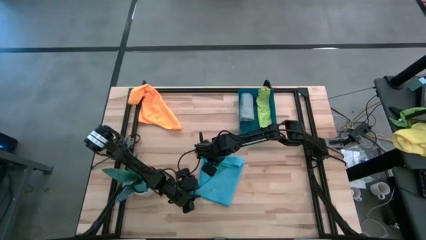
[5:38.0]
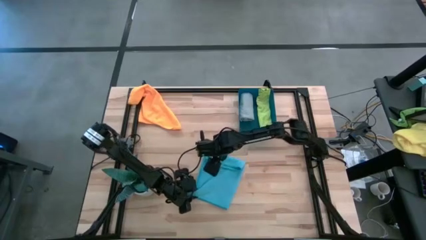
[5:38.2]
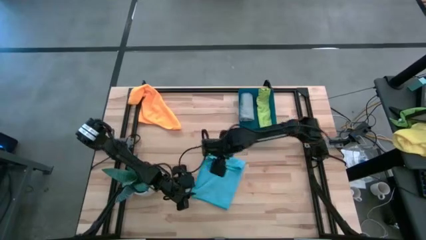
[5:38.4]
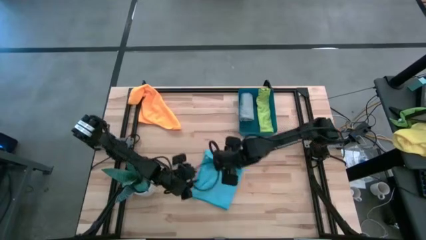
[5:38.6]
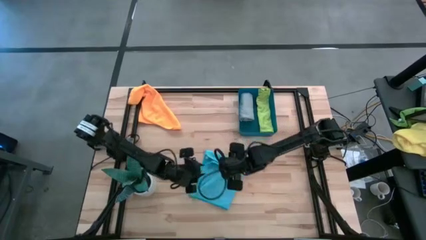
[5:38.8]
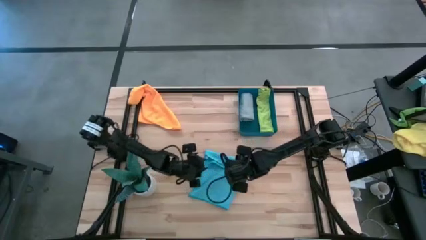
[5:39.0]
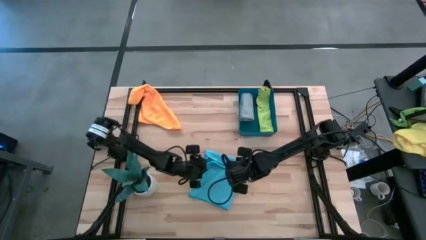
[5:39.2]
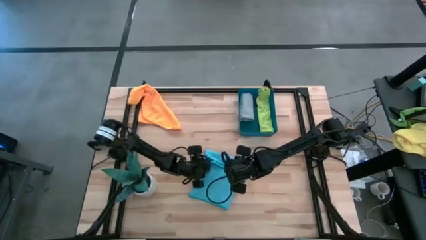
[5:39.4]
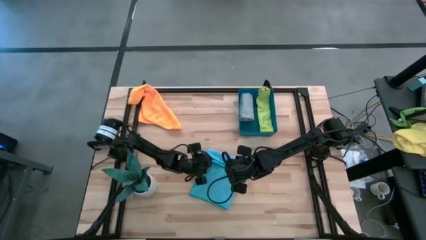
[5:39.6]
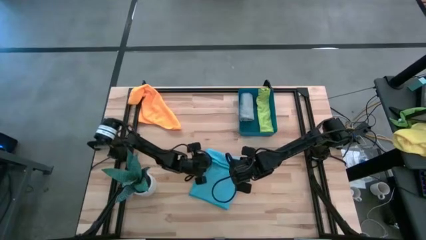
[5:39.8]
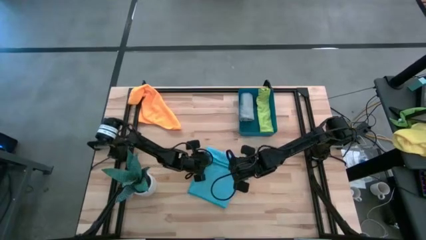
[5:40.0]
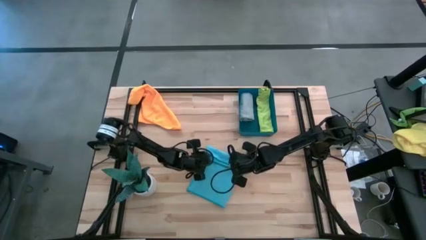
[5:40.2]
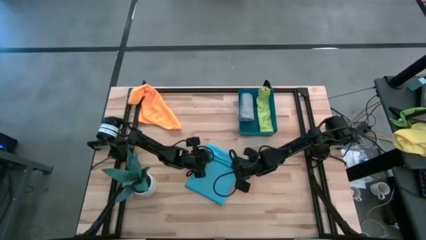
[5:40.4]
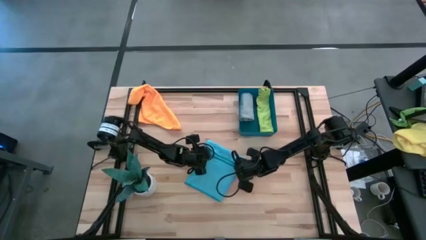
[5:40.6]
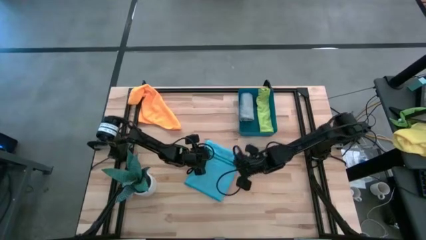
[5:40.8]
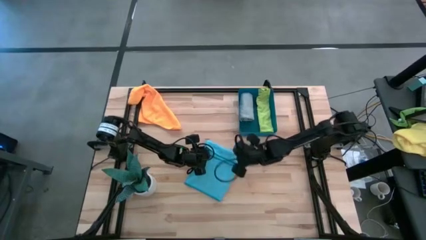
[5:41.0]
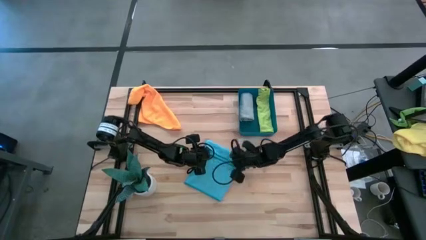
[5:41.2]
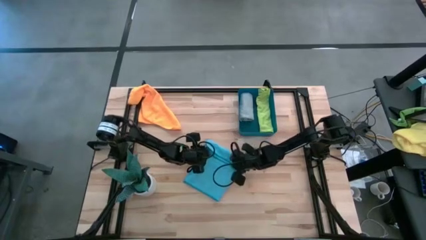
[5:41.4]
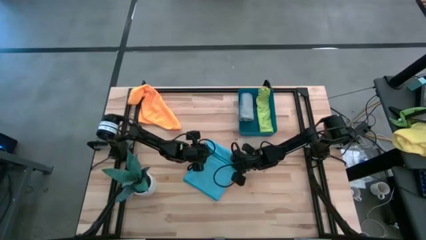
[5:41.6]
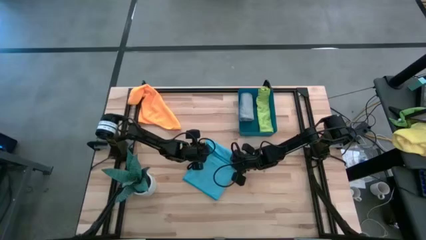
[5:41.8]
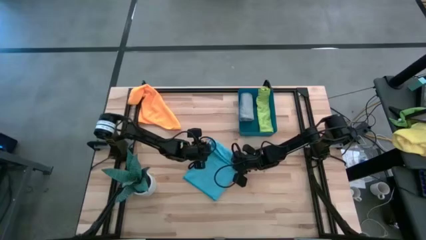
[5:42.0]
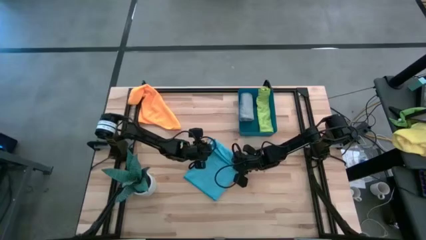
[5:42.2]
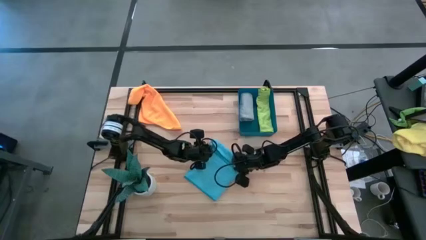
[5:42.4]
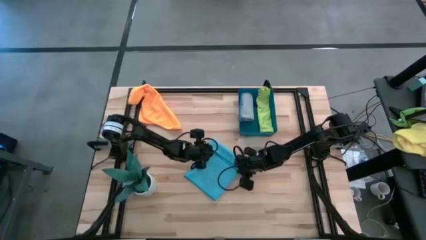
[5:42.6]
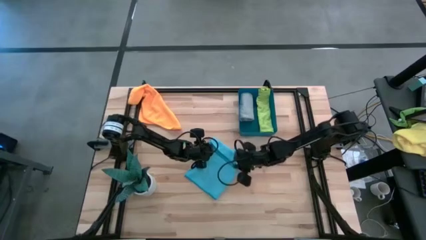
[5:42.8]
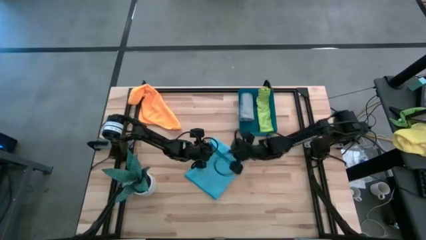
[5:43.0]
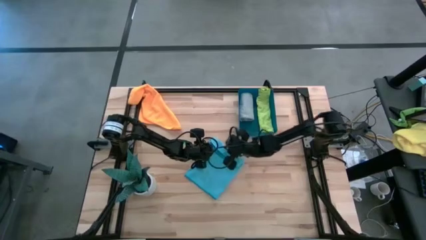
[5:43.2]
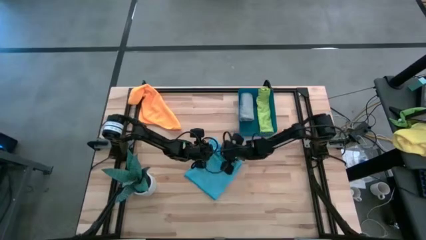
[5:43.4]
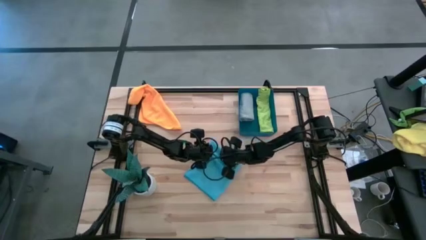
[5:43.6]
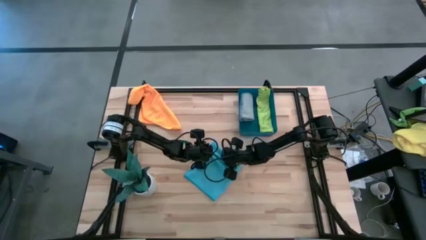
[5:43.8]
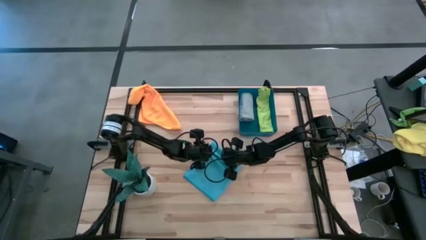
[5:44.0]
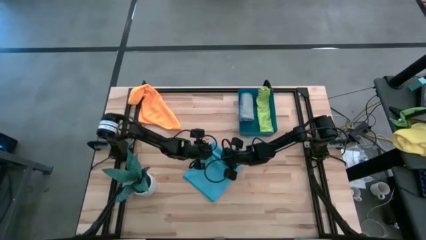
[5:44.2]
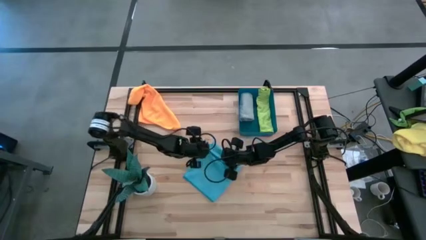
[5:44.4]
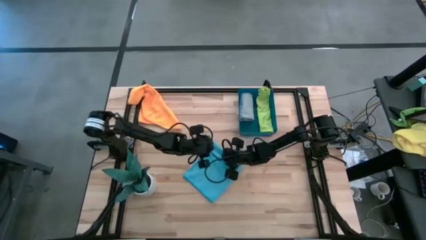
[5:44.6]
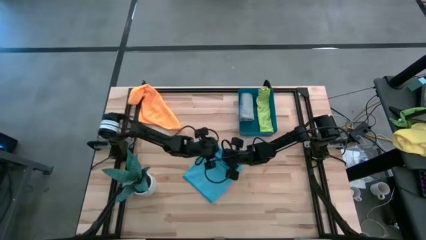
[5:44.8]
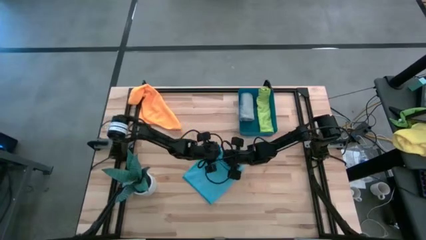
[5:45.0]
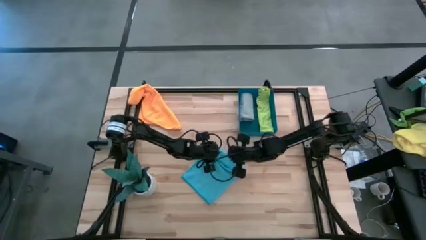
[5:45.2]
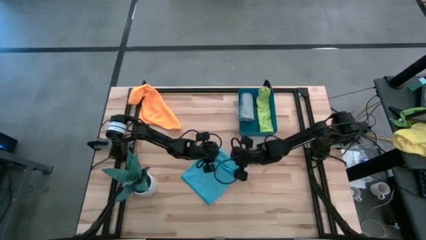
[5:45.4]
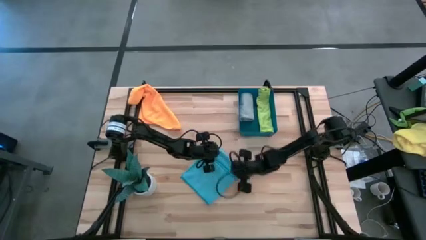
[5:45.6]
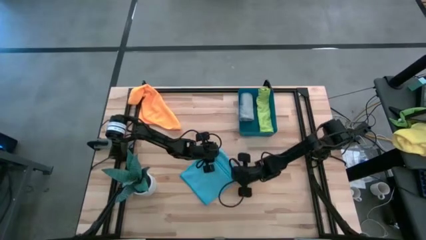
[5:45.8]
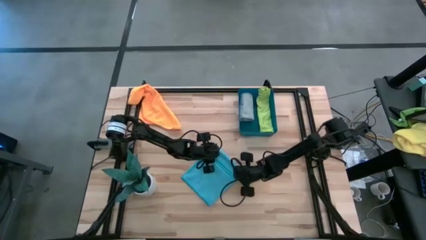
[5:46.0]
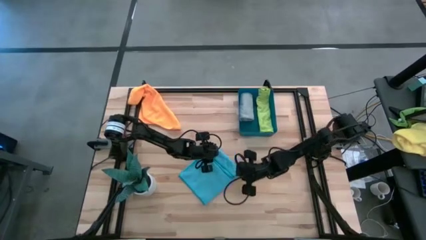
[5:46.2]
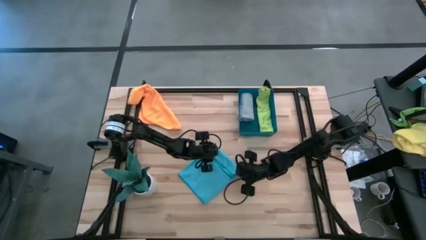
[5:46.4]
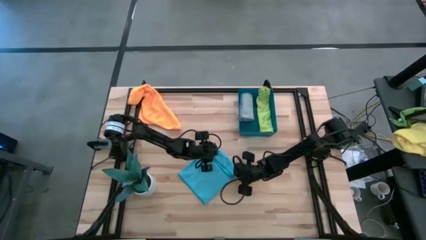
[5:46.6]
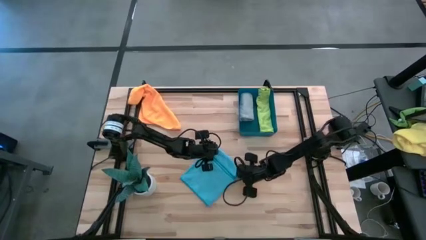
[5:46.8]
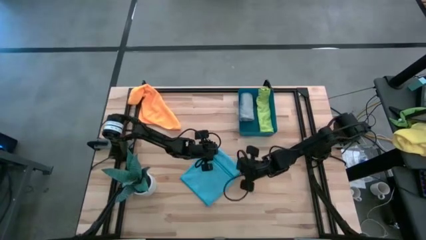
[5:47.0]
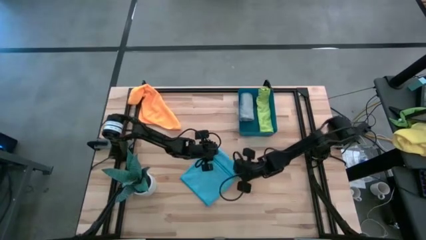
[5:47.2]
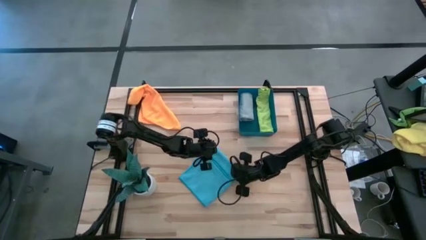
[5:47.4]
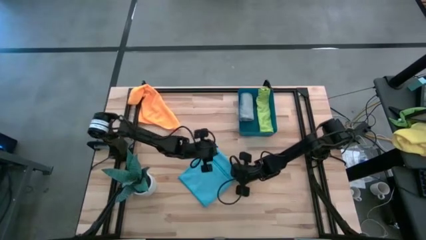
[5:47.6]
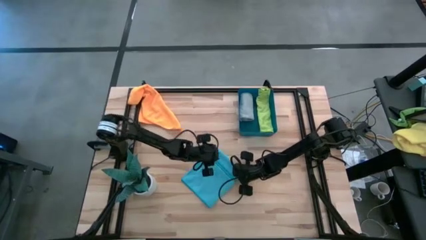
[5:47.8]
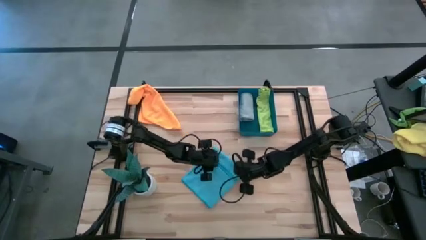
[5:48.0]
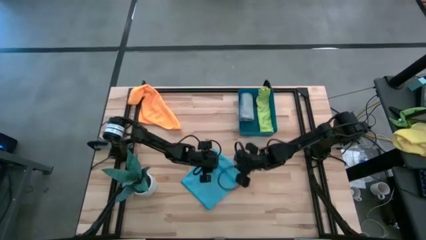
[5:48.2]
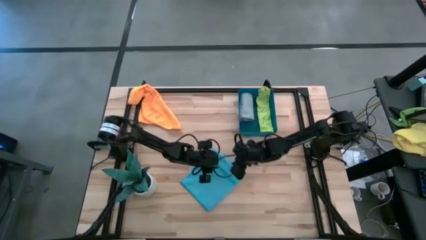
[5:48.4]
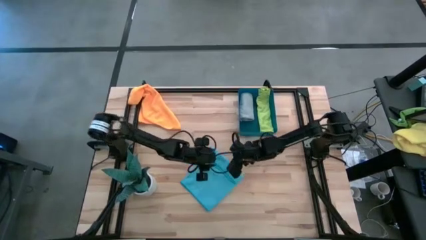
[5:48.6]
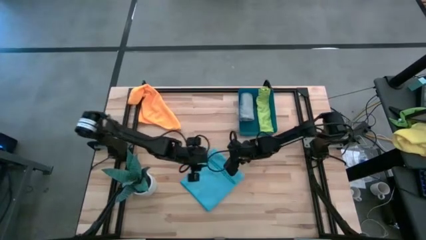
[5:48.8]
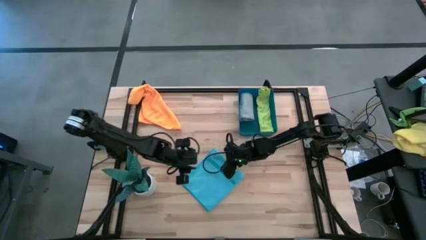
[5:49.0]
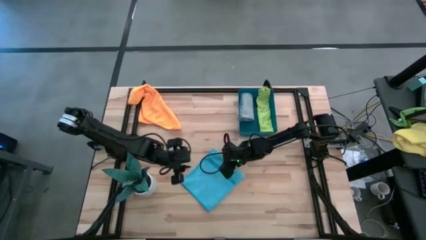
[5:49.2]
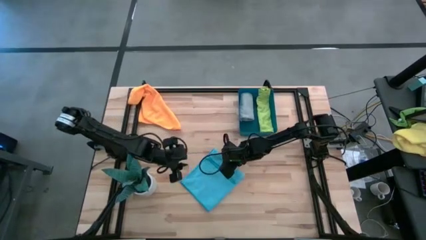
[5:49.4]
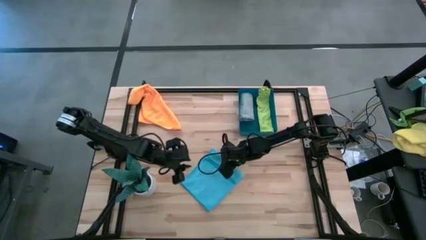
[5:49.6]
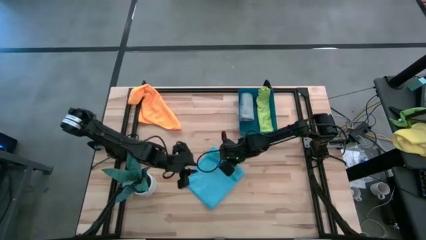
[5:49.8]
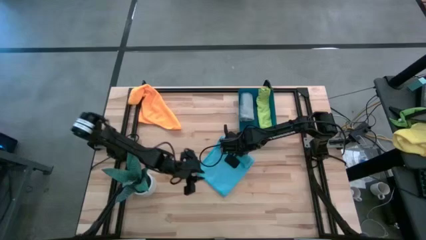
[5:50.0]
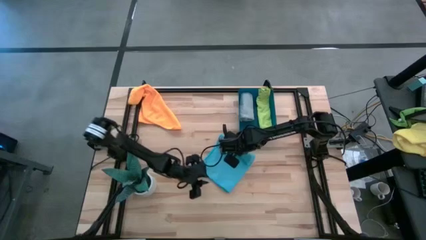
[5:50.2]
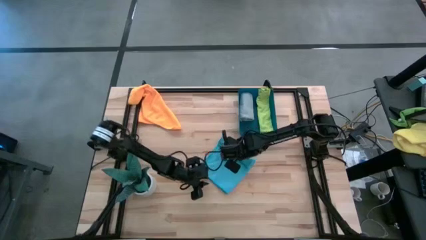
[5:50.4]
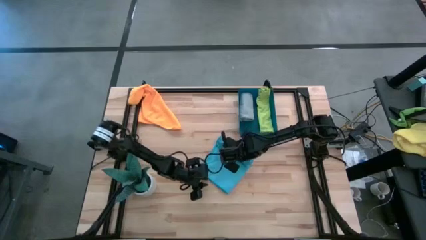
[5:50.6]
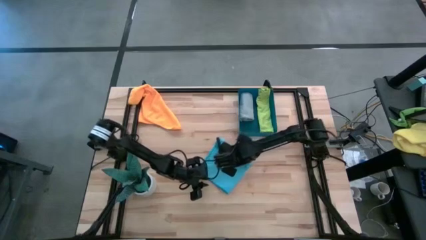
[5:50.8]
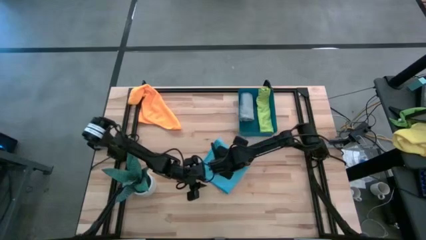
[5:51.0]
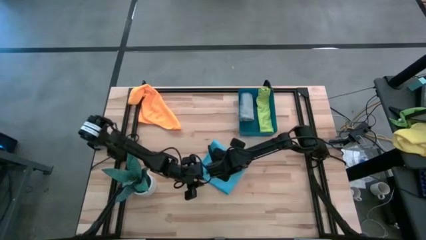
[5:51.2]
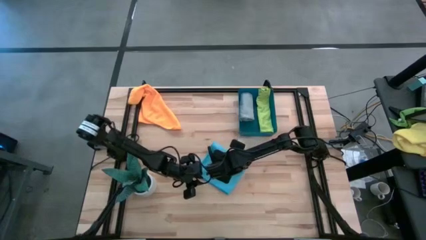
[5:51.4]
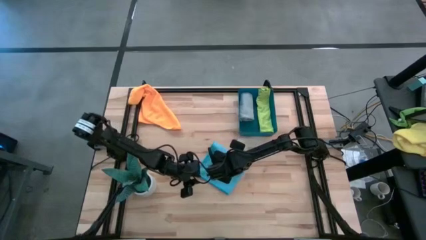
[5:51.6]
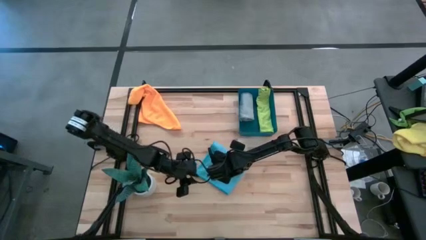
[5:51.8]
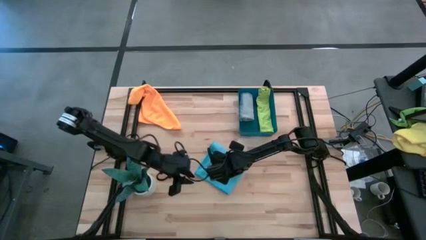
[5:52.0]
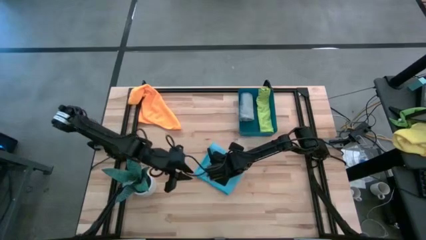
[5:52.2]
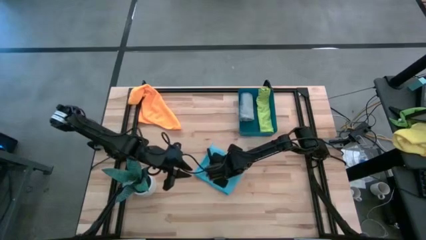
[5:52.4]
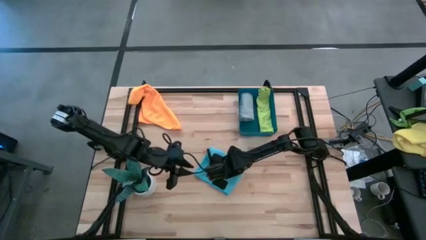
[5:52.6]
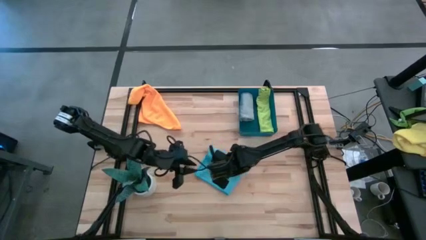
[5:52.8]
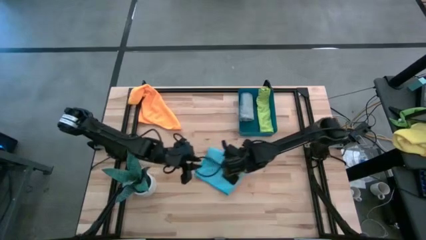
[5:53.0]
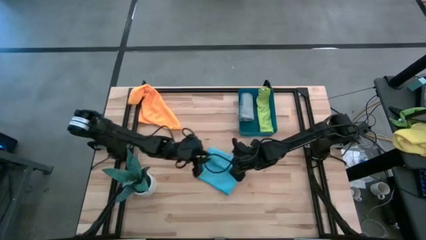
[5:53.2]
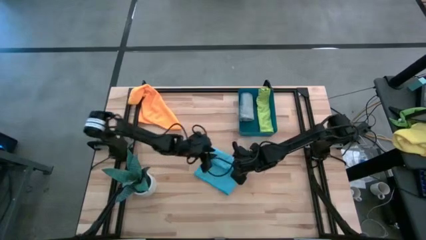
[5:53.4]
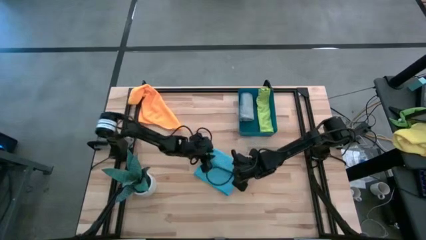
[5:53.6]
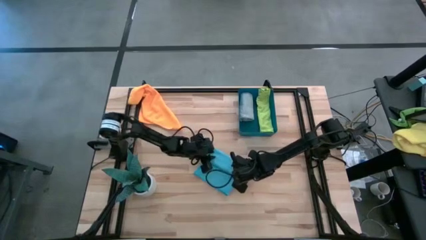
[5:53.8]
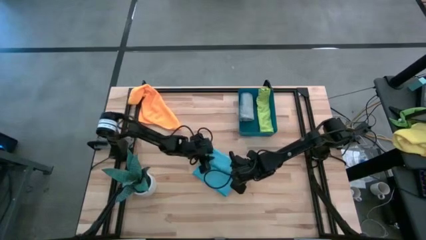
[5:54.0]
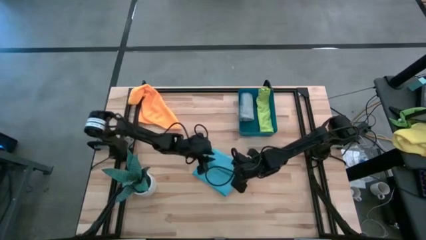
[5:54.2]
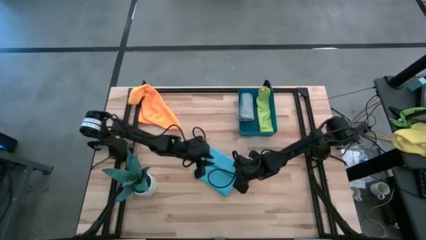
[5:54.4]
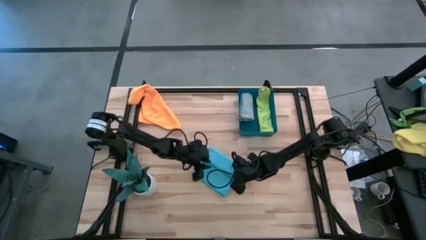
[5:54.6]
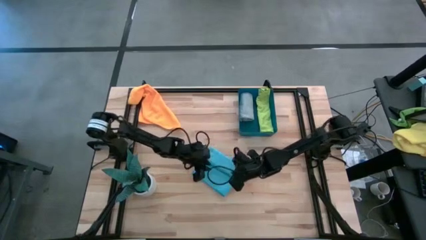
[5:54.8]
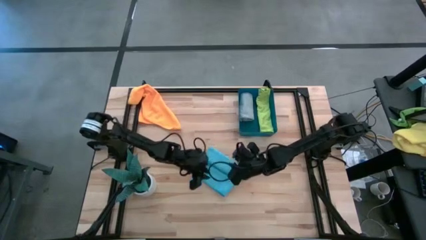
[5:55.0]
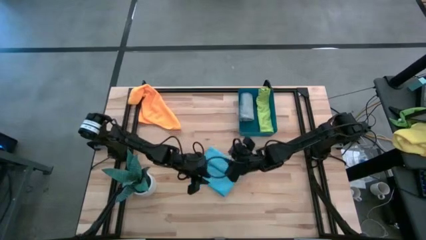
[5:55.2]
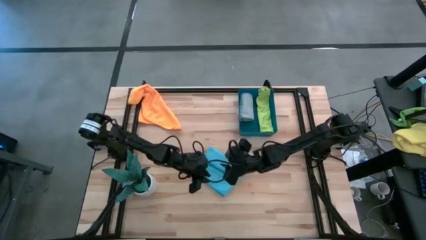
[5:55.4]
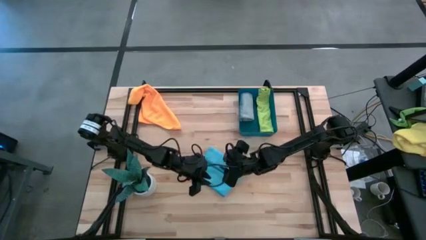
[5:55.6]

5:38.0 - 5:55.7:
Task: Roll microfiber towels into tight, uniform cylinder then place into a basket
Roll the blue towel
